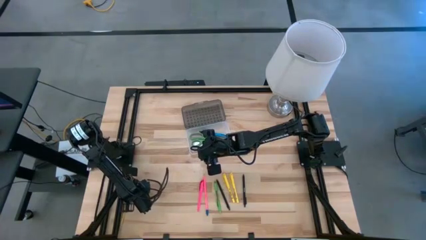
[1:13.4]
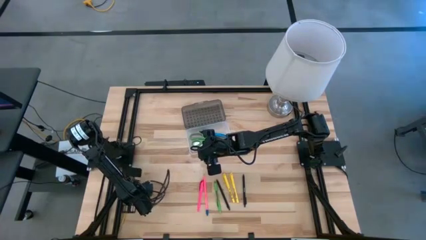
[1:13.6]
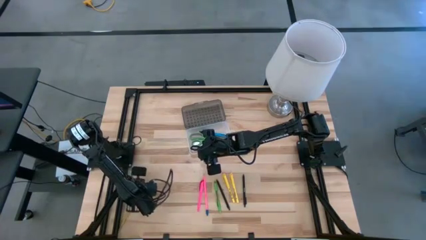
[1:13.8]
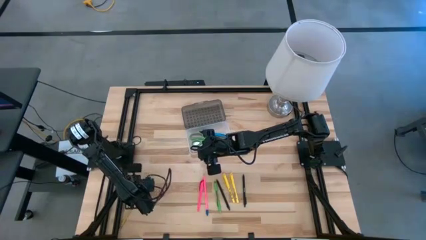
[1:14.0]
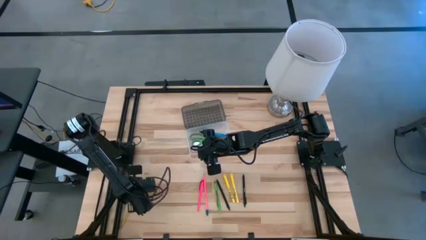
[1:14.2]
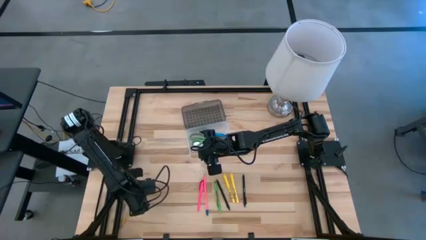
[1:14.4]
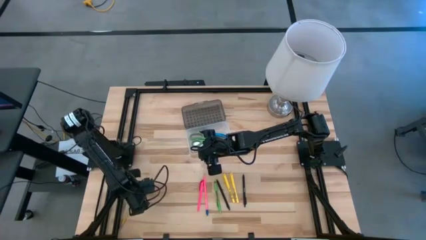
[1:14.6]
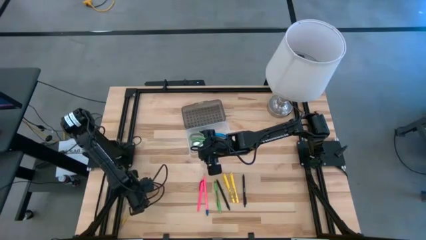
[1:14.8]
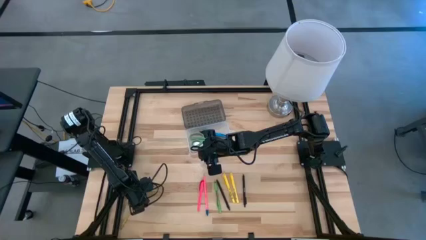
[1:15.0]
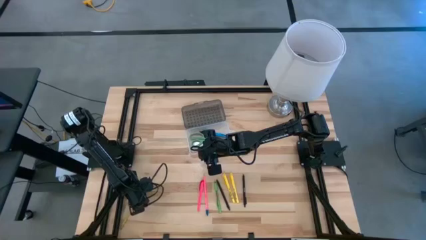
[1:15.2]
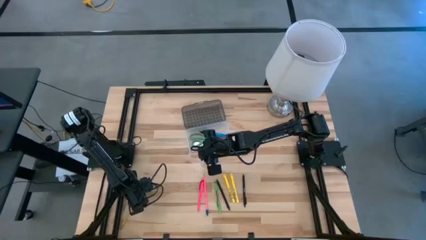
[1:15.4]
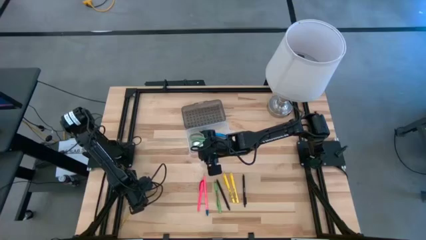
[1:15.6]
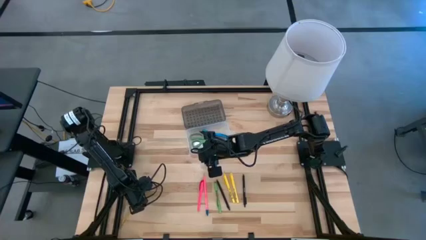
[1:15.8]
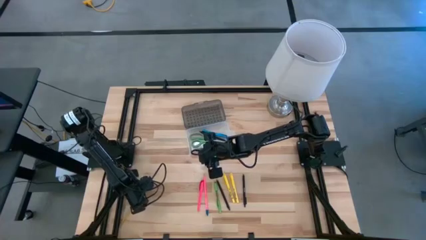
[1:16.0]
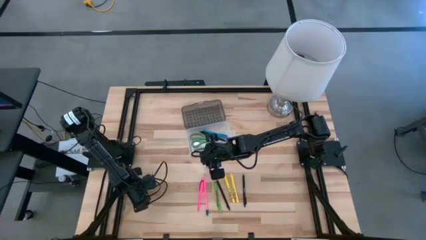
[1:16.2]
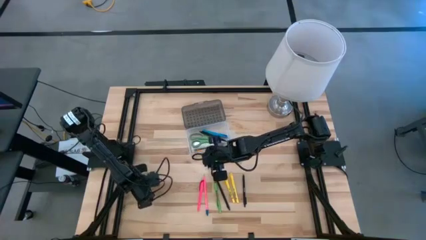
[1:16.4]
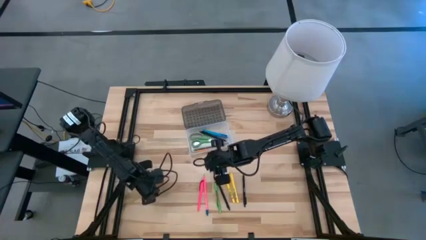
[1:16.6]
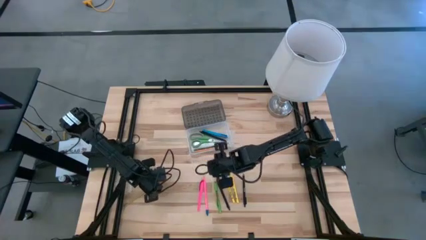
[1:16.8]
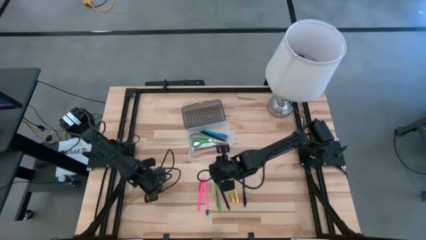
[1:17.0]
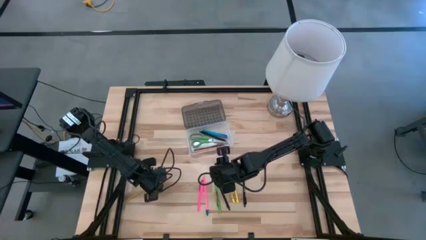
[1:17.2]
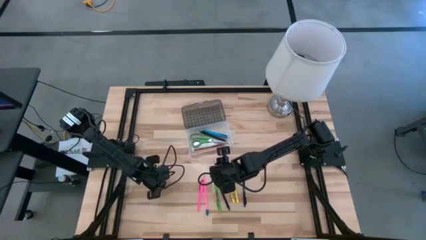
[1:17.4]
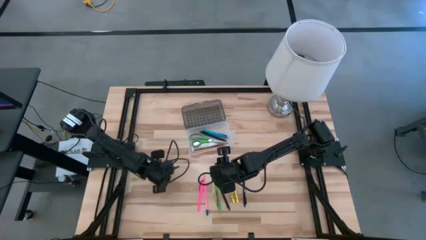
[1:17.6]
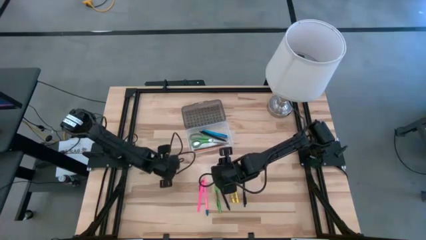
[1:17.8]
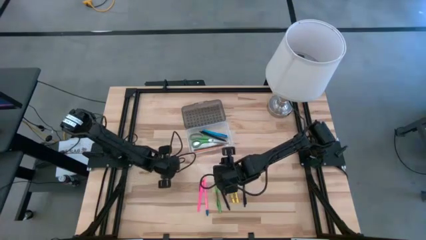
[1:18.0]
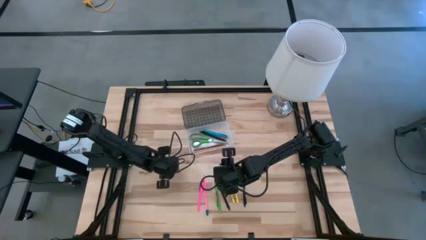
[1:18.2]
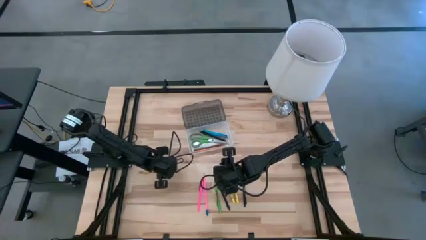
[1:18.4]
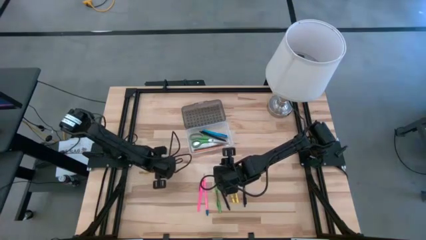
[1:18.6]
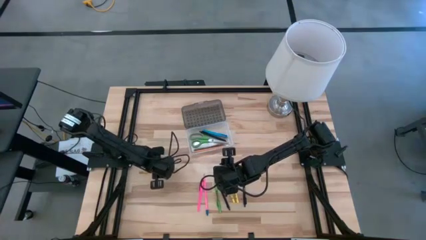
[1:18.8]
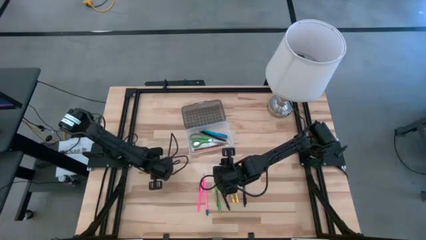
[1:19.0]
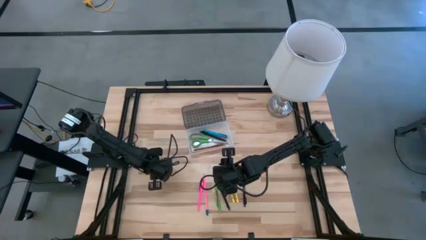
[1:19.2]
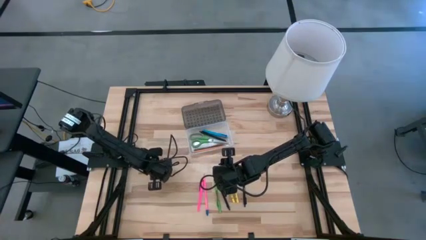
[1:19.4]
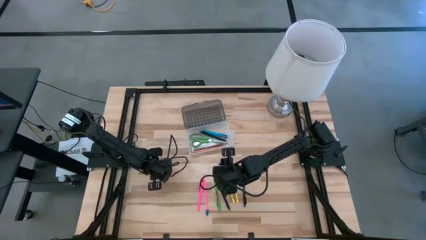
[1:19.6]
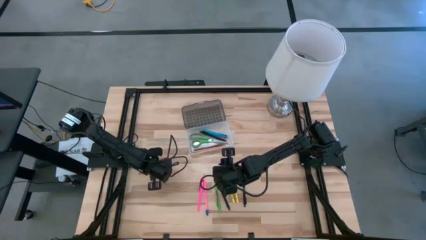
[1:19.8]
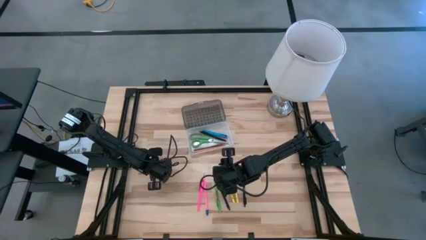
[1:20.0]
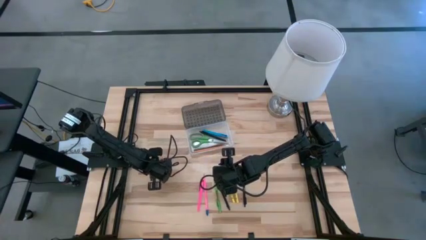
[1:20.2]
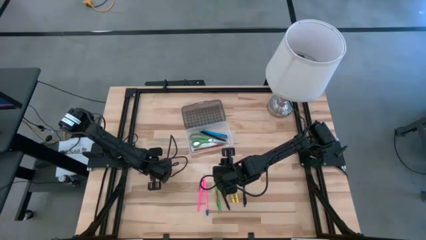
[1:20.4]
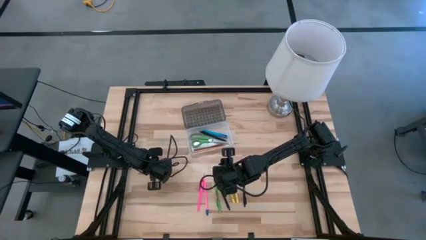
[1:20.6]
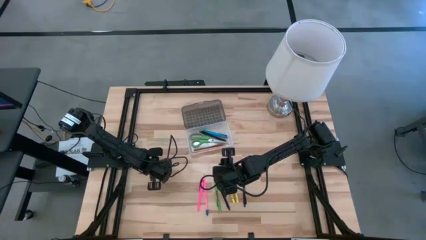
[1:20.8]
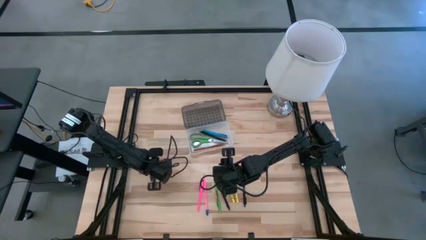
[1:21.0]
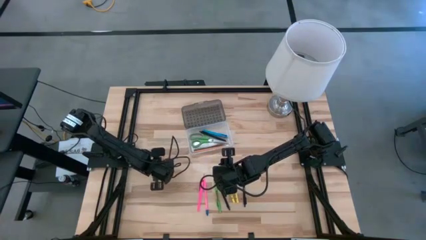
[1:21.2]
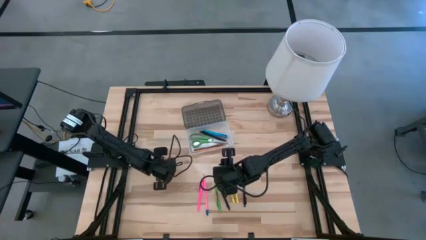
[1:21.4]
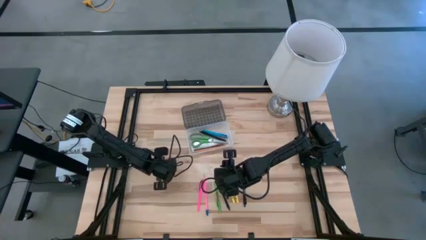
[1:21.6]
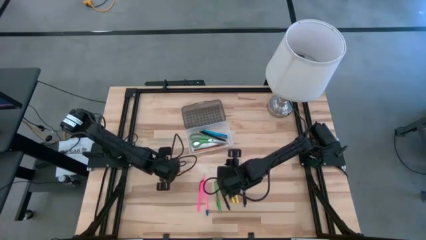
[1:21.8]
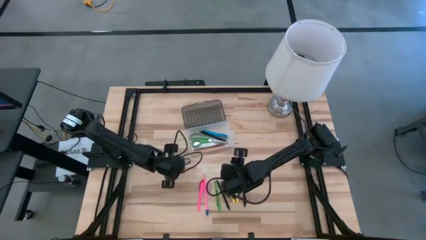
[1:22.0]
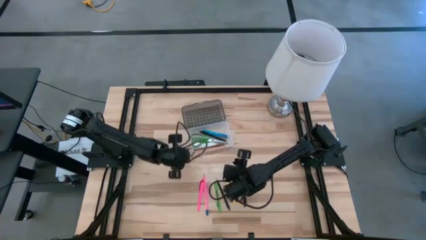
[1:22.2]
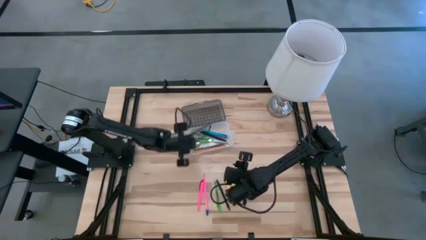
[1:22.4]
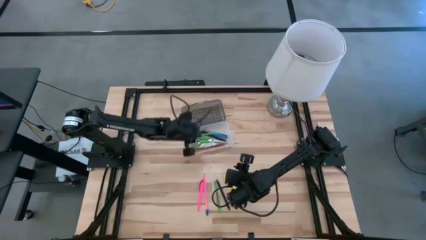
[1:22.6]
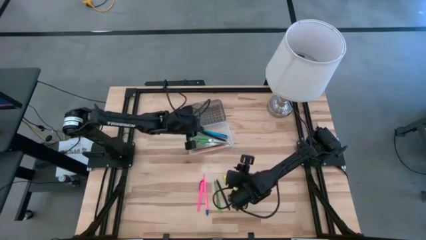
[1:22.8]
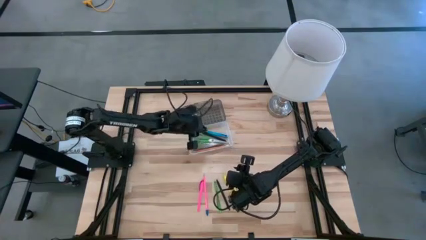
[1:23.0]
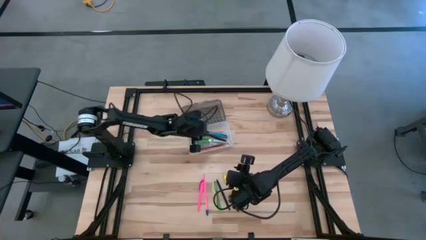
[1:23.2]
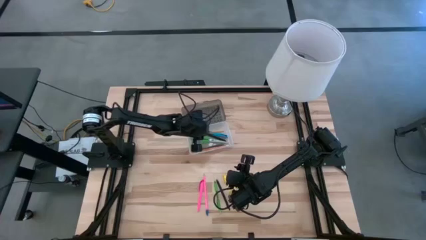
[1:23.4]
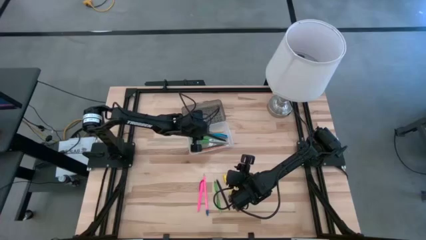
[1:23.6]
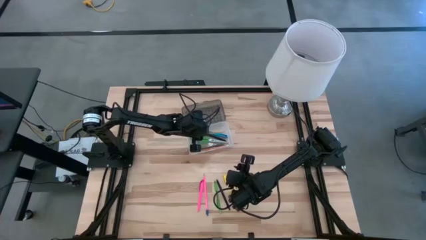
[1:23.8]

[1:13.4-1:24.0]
Task: Pick & place school supplies into a supply box
Put the yellow pencil into the transparent supply box

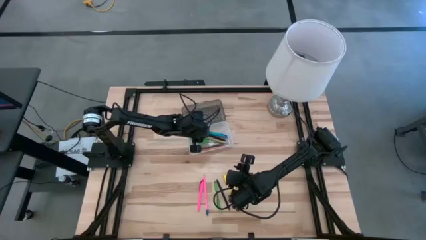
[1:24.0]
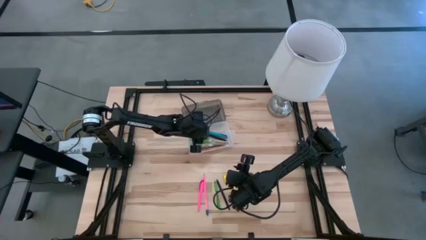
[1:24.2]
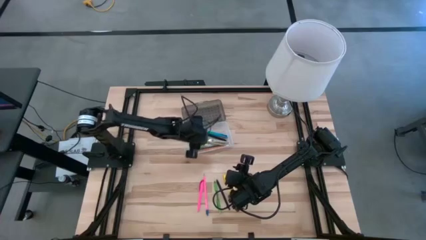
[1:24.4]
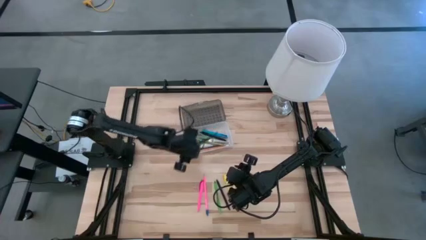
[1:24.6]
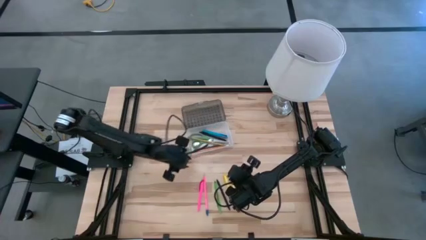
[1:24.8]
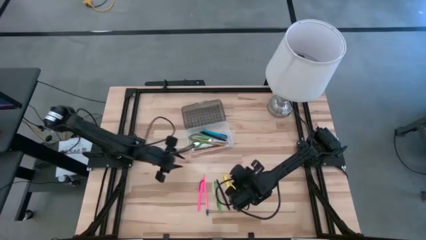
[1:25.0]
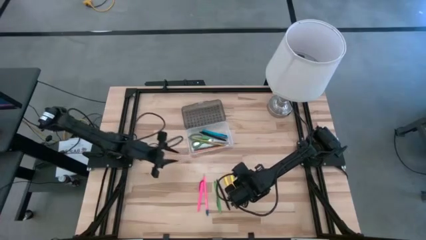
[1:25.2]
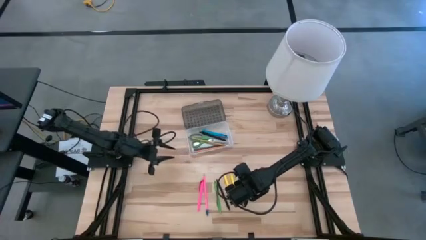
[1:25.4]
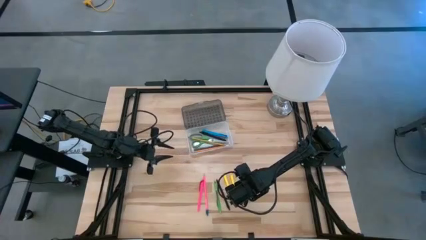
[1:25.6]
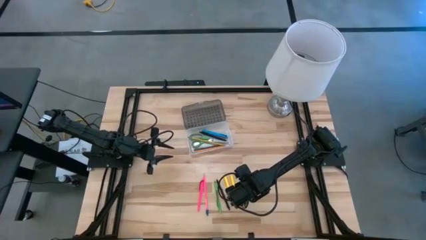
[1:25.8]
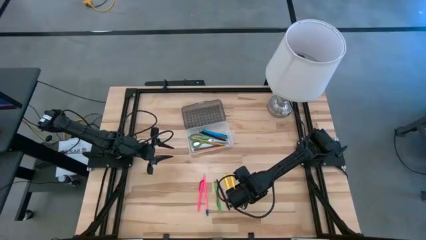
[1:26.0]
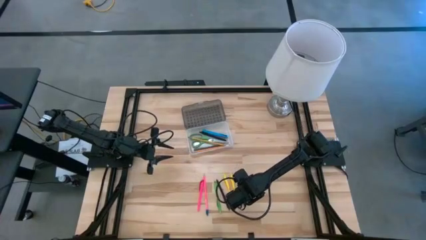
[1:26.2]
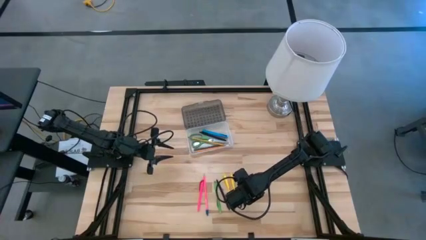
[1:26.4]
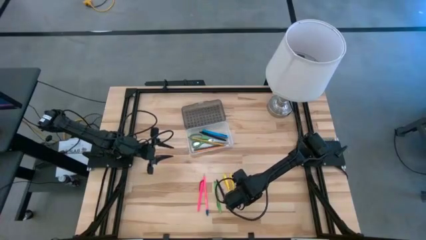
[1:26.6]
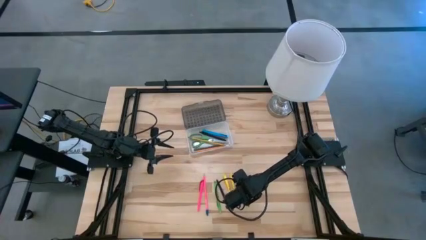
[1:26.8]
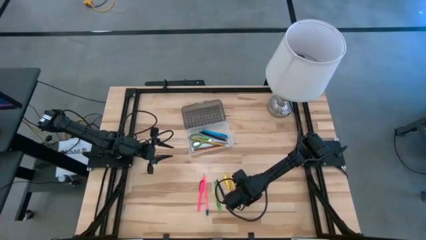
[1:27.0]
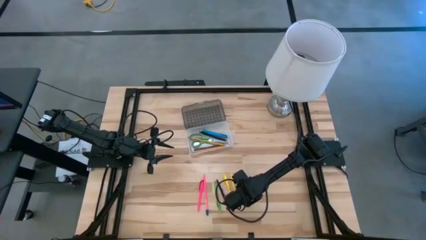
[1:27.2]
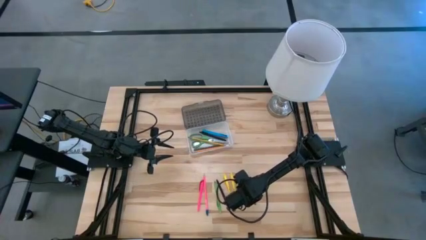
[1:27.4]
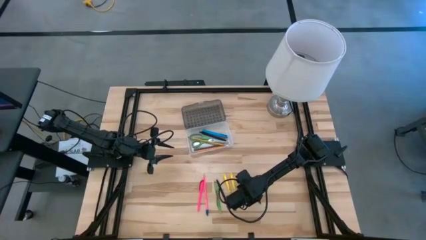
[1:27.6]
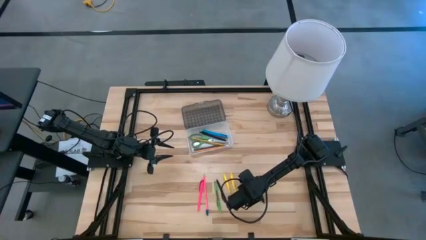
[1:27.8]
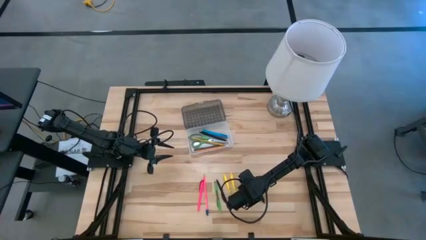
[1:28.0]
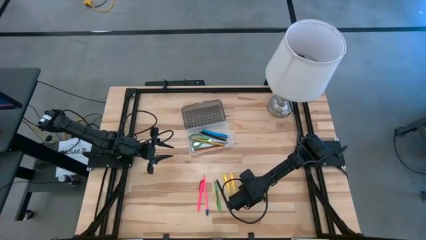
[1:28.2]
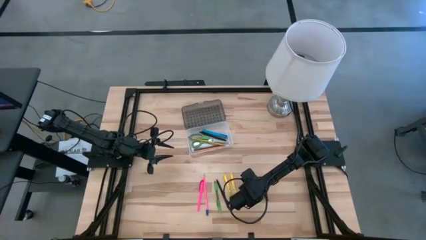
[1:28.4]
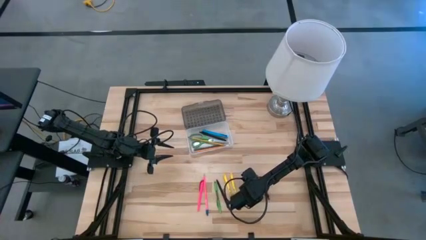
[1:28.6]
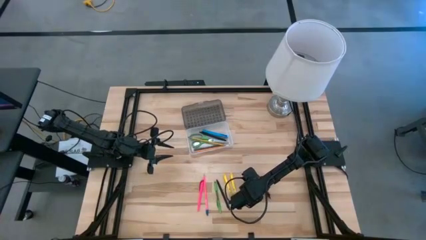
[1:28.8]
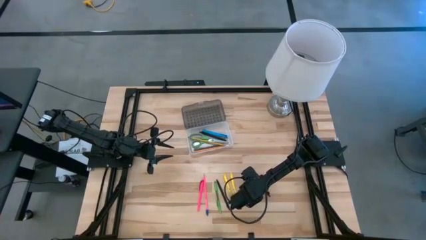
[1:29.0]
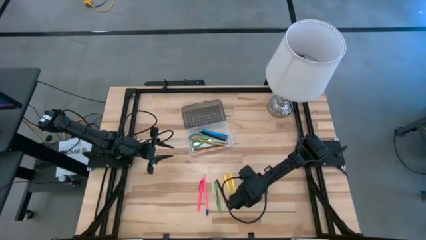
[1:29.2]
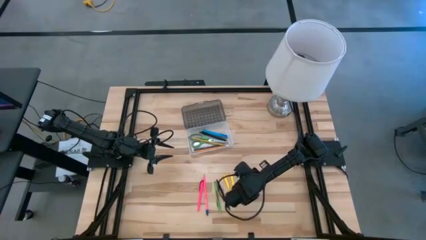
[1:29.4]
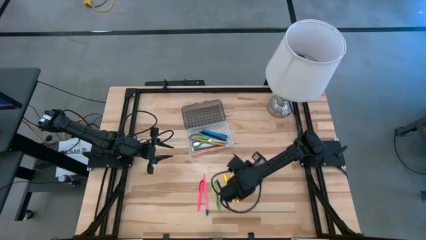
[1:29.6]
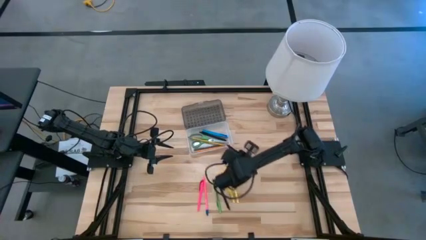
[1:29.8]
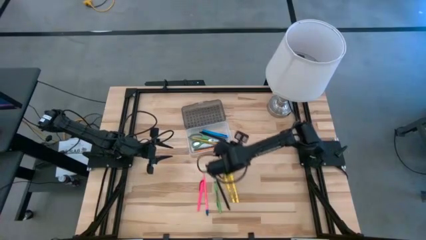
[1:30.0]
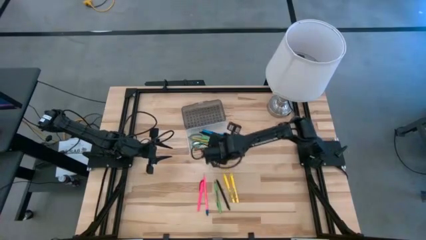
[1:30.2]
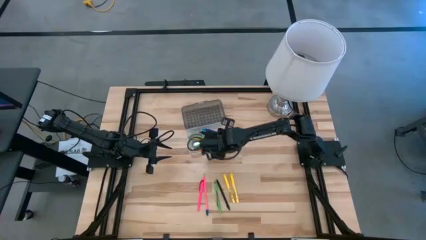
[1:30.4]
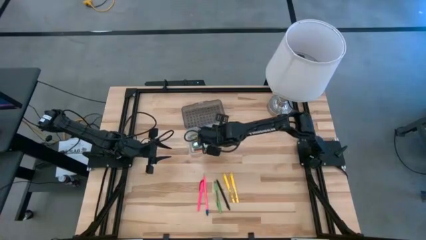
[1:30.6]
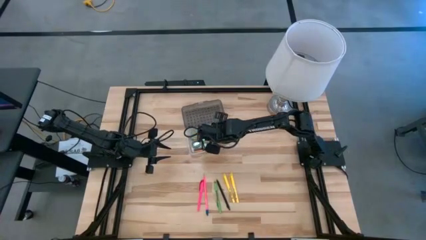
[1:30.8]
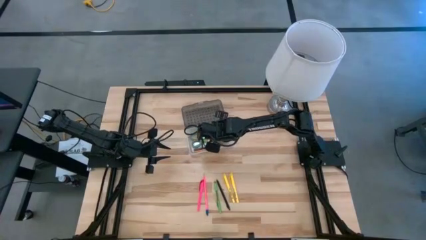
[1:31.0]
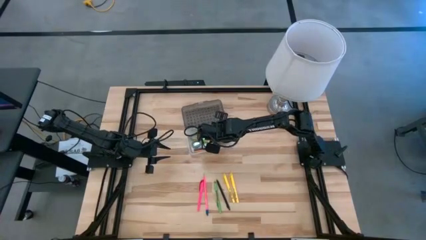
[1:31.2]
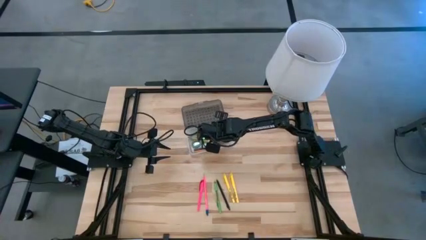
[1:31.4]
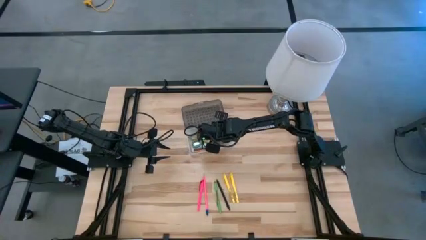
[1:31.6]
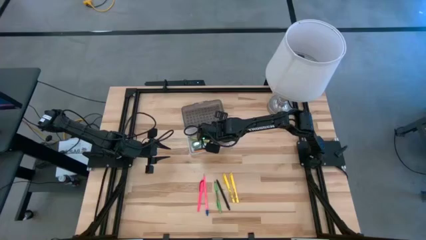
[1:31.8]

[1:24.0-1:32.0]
Put the right black pen into the transparent supply box
